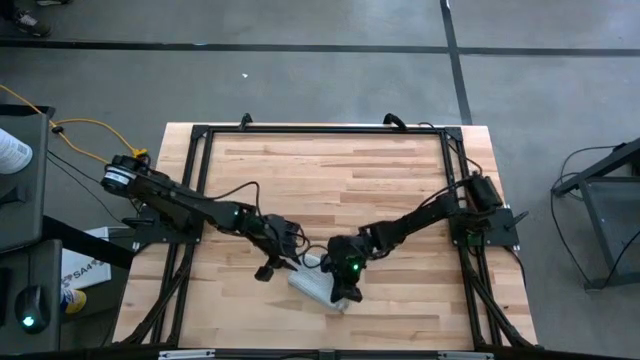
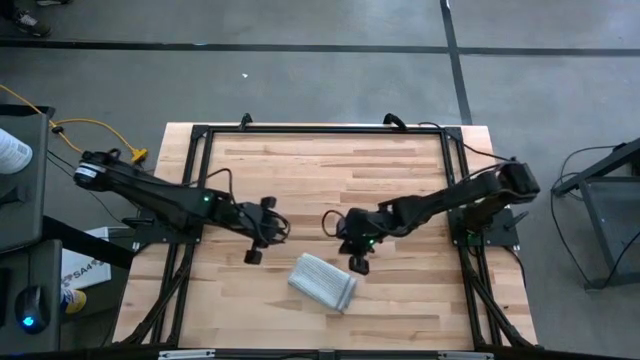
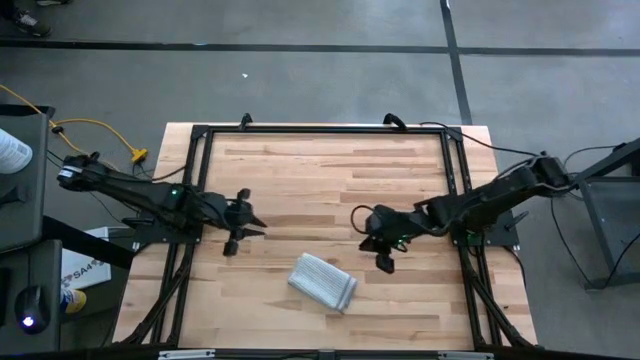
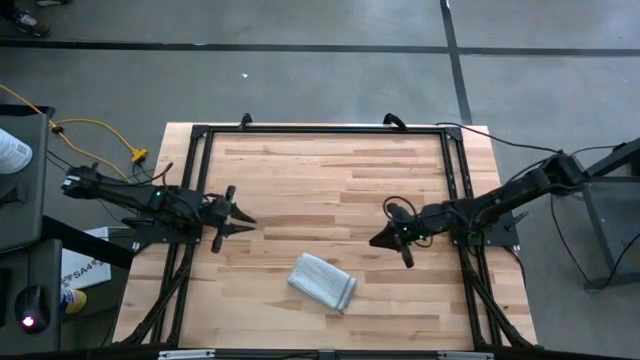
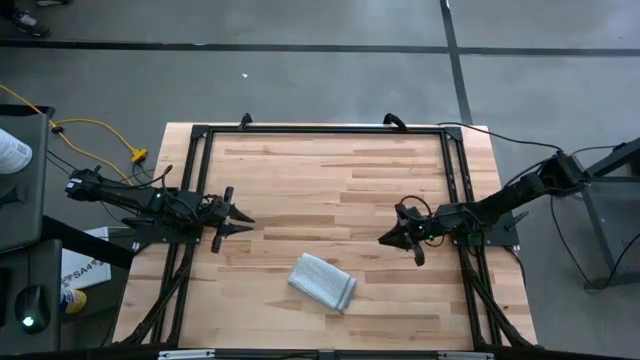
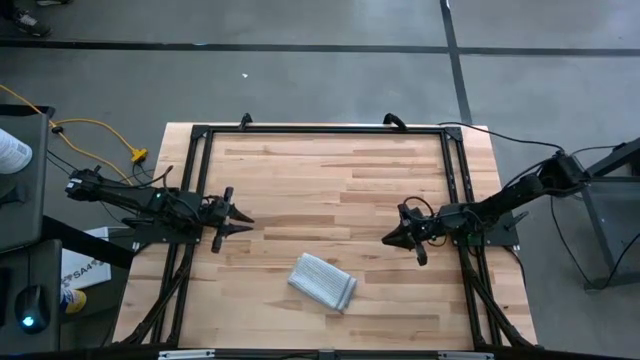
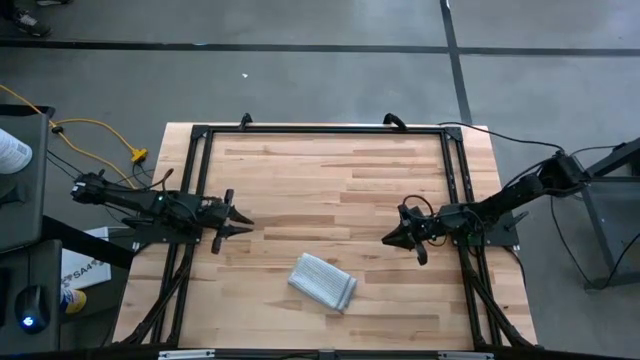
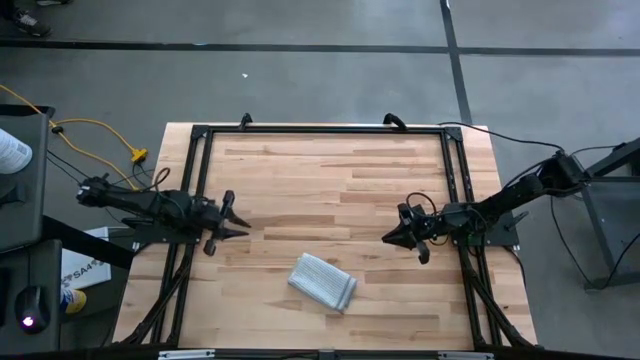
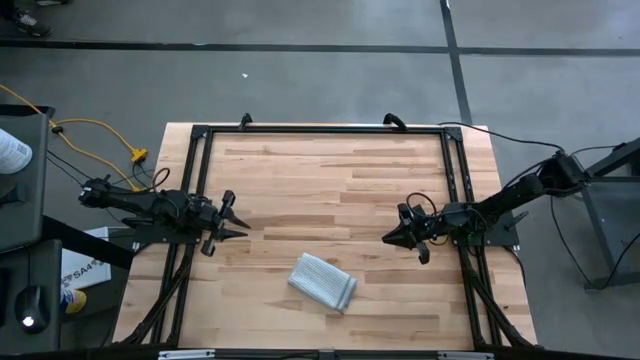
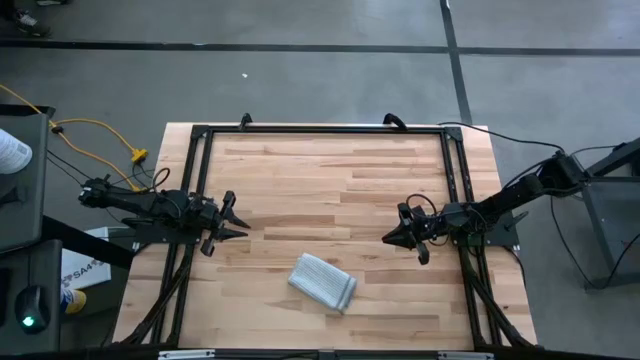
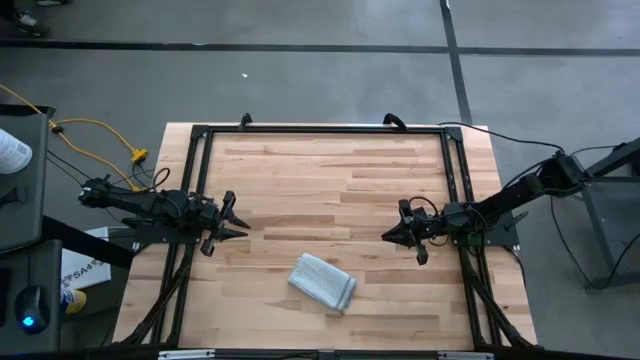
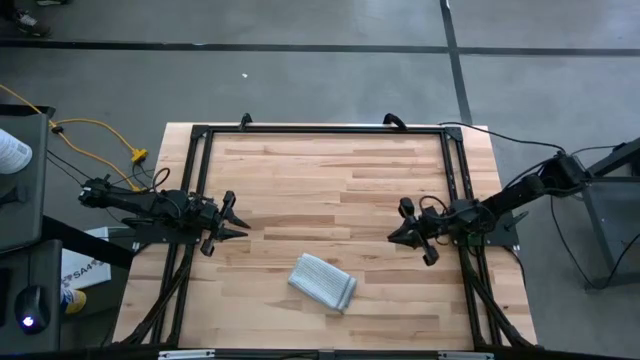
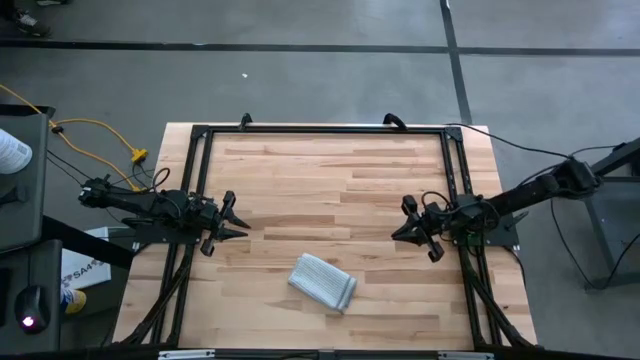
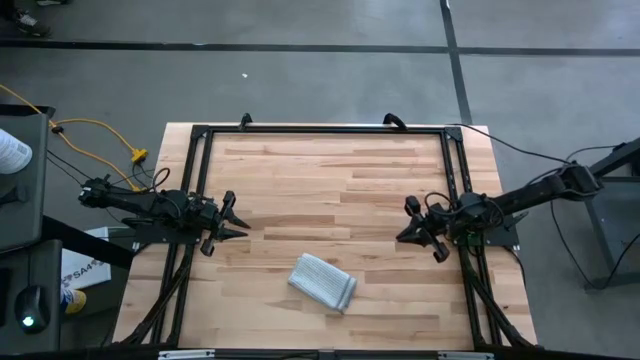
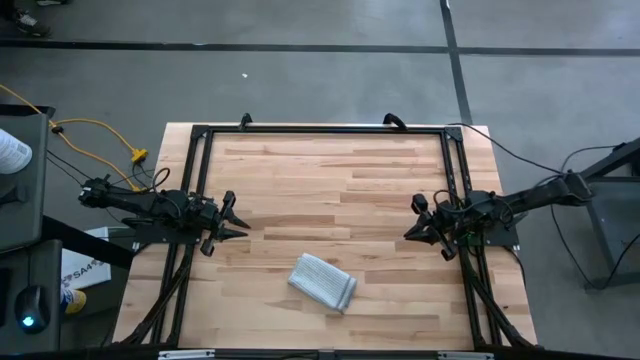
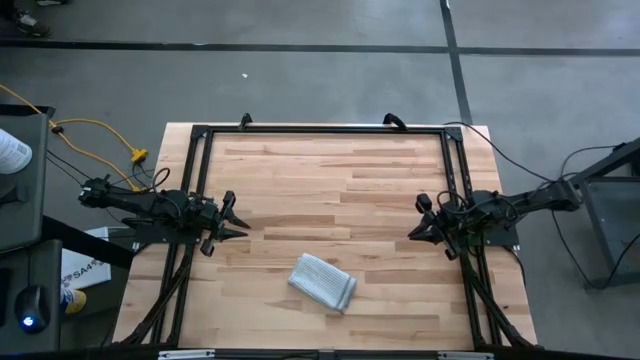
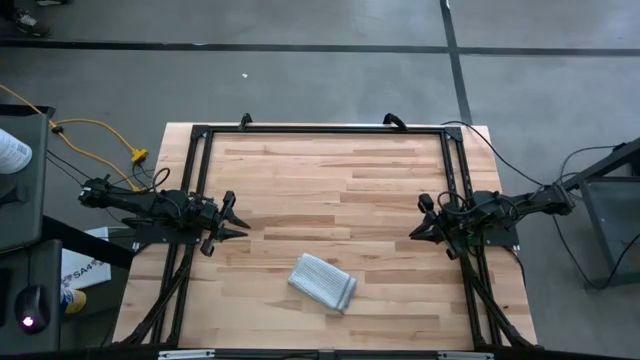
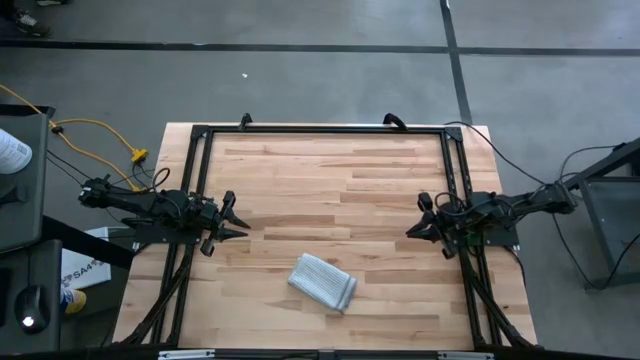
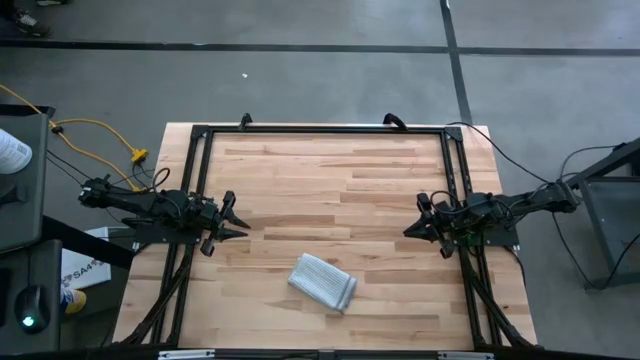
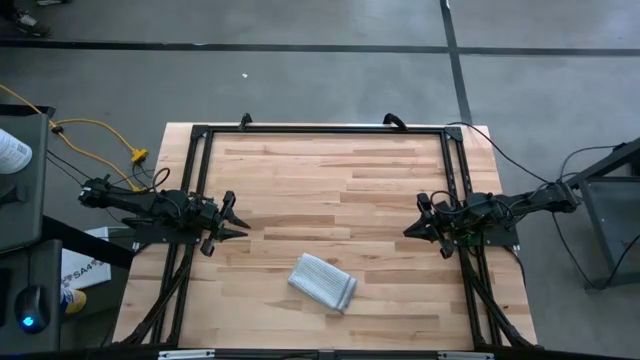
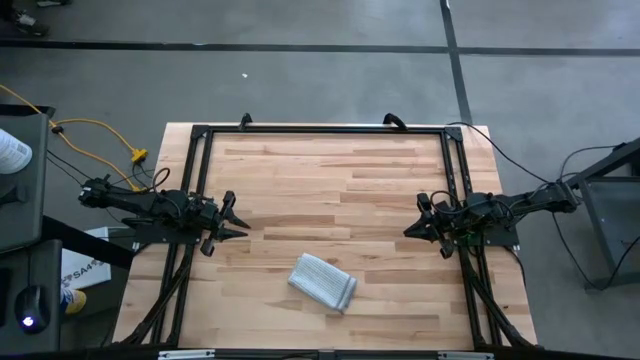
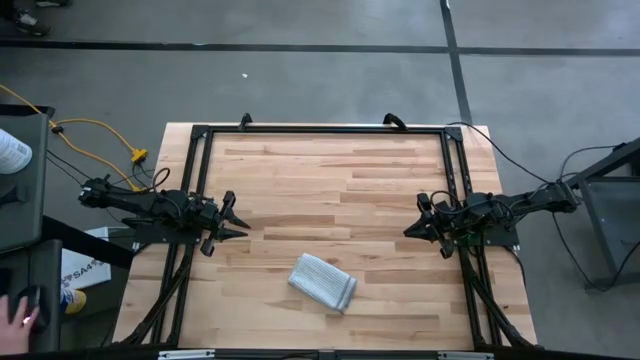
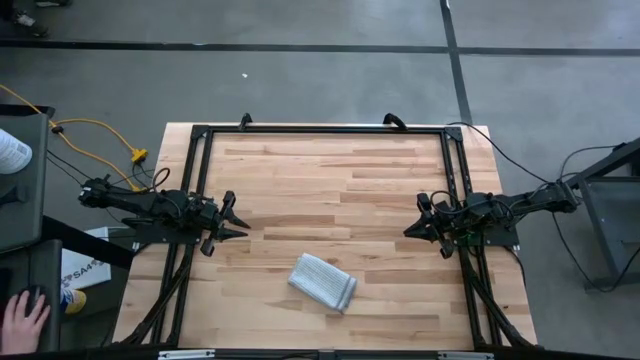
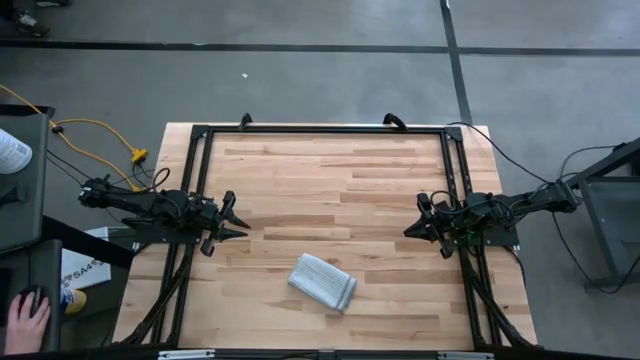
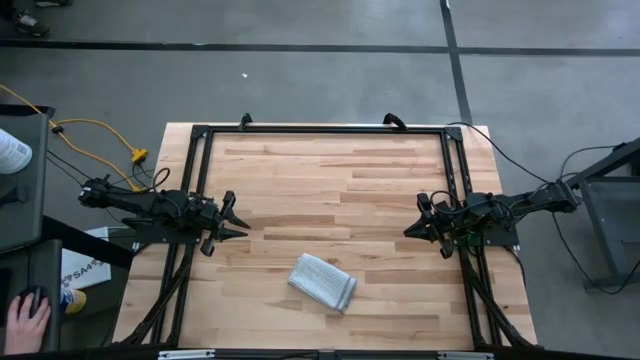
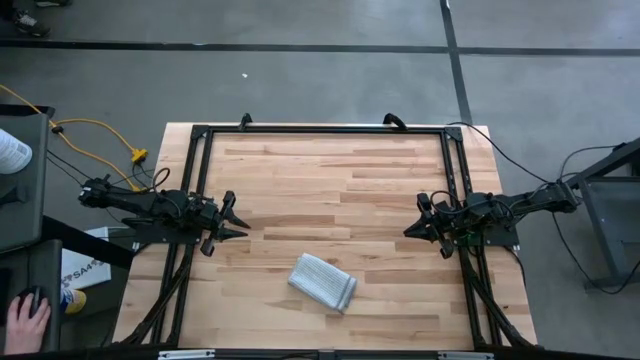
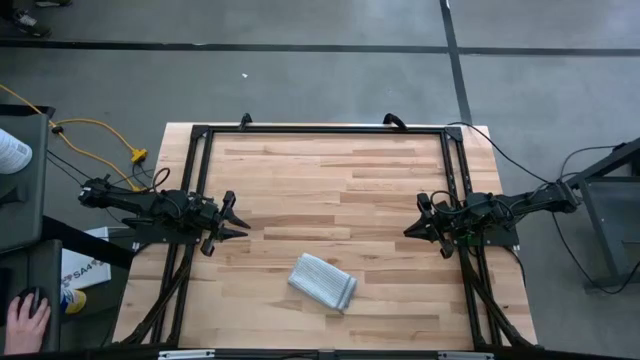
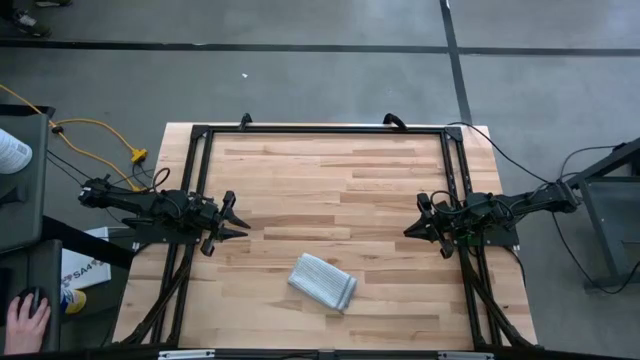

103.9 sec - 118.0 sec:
Task: Fold microfiber towels
Return to Home Position

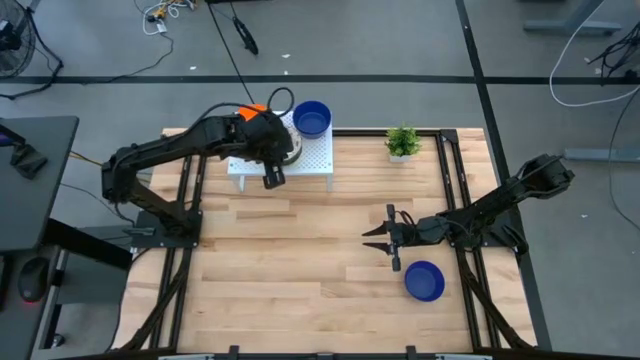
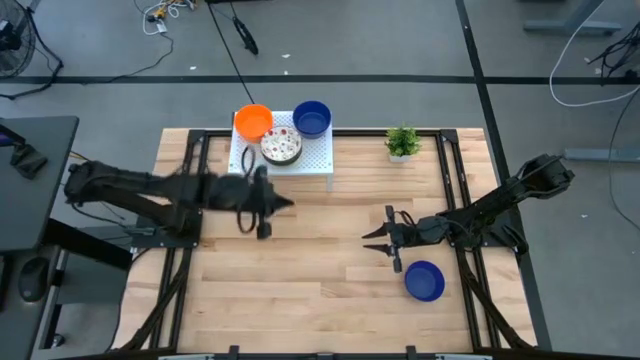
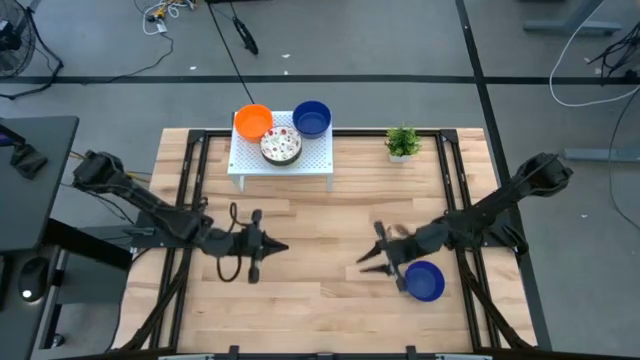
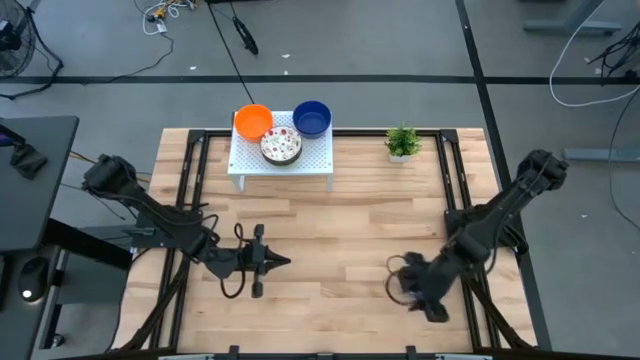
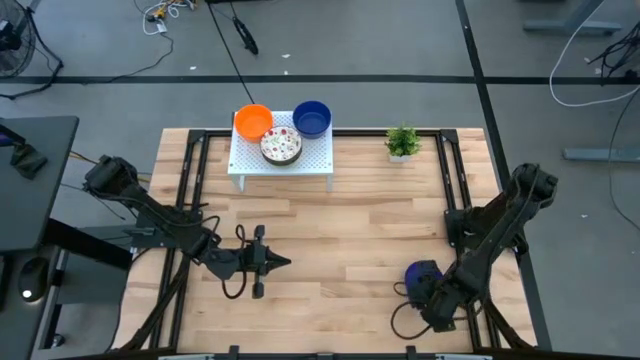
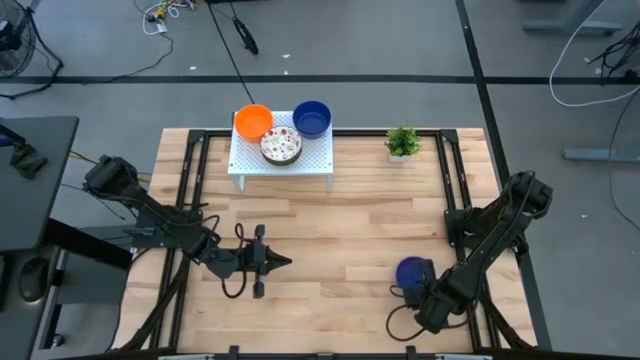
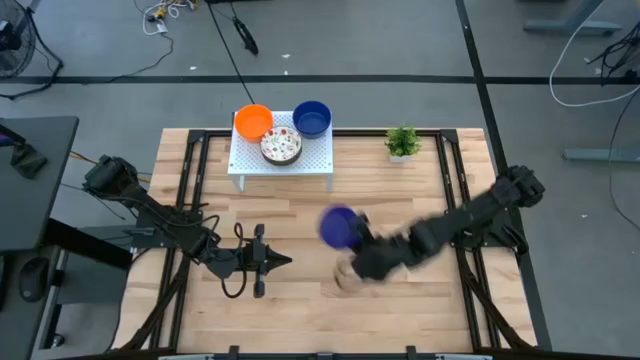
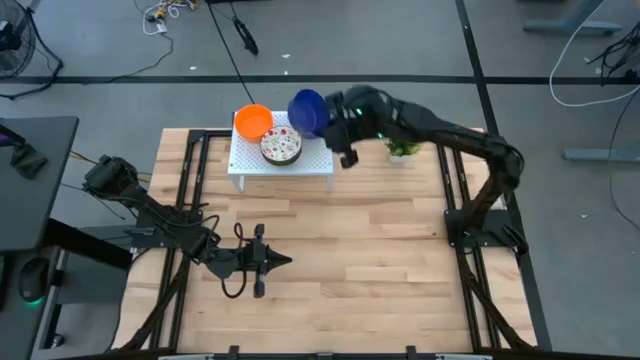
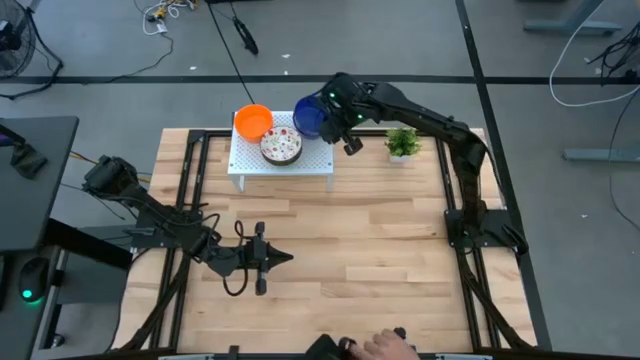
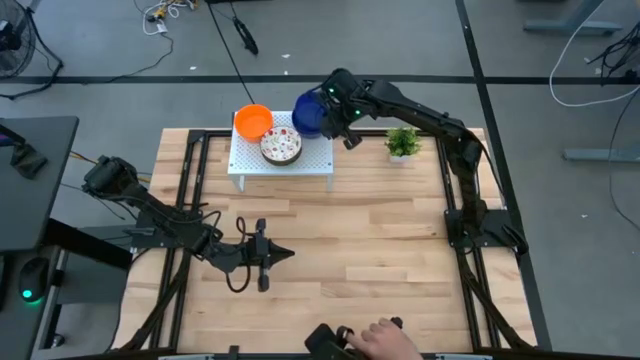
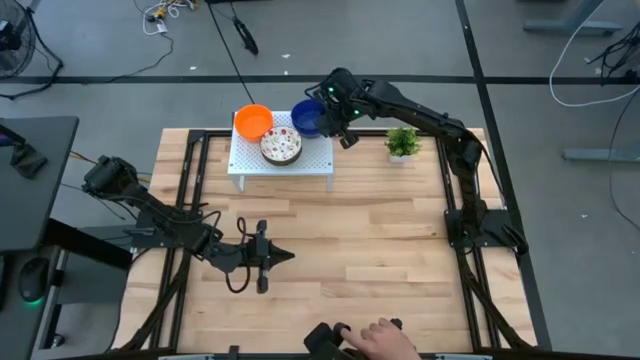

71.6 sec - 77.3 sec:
Task: Pick & Place Mini bowls
Stack the blue bowl on top of the blue bowl on the shelf
